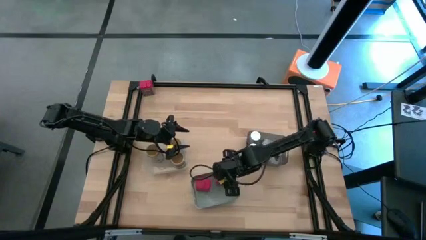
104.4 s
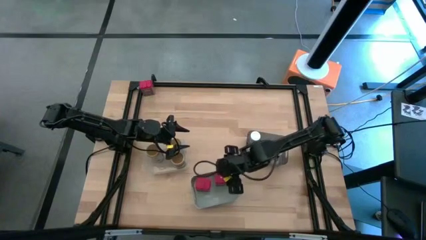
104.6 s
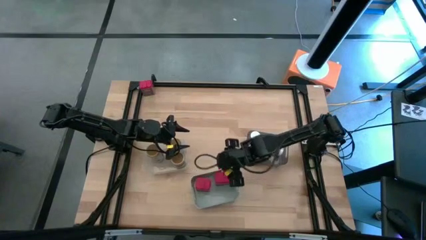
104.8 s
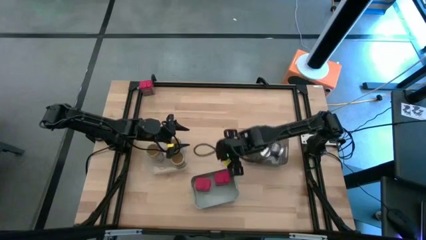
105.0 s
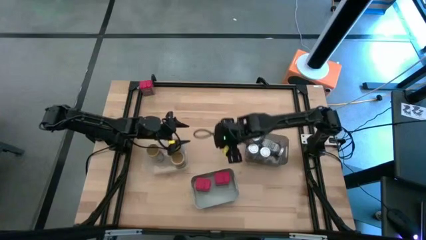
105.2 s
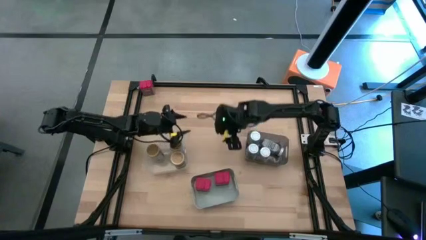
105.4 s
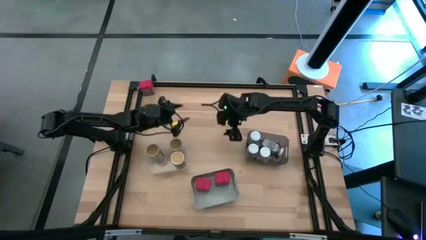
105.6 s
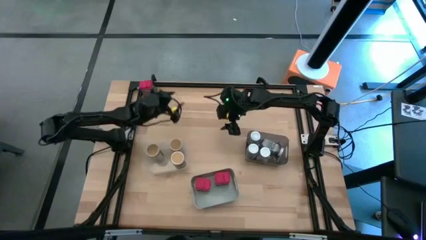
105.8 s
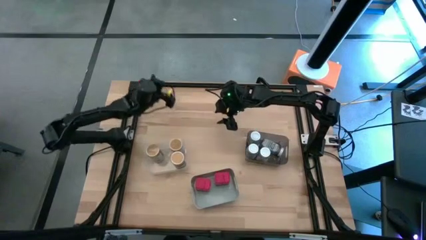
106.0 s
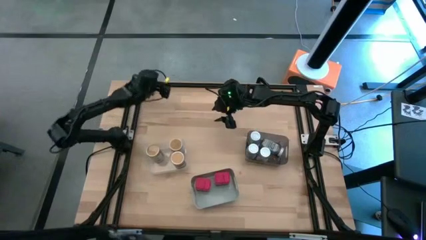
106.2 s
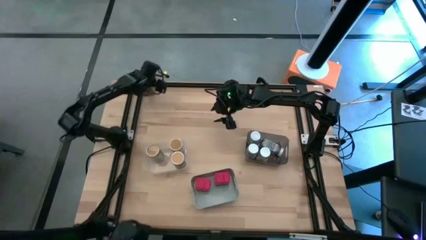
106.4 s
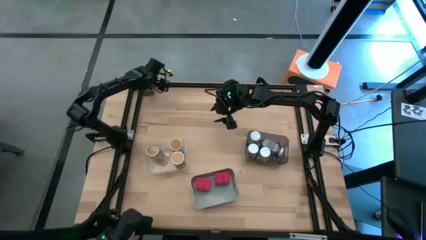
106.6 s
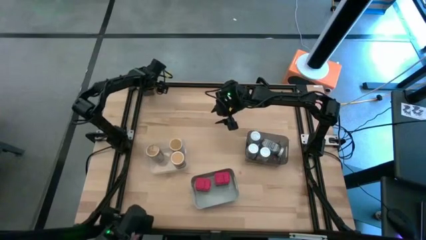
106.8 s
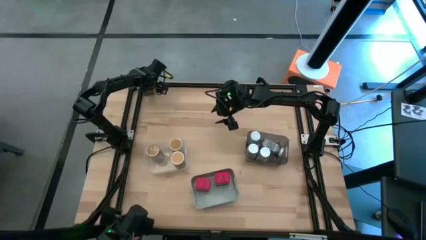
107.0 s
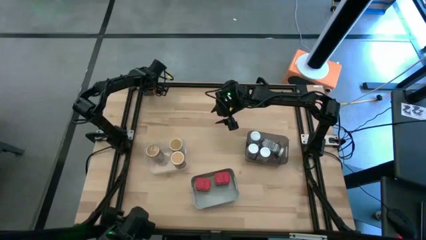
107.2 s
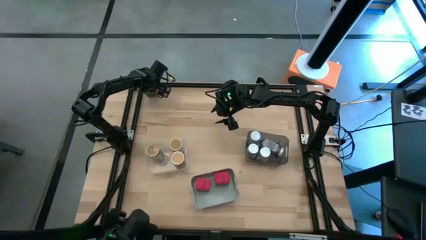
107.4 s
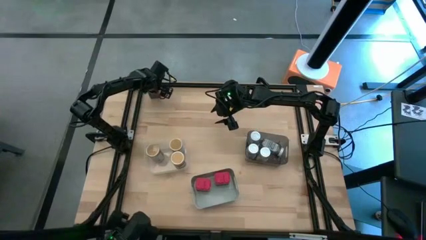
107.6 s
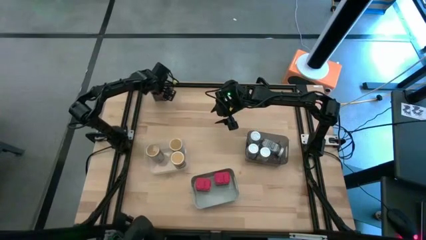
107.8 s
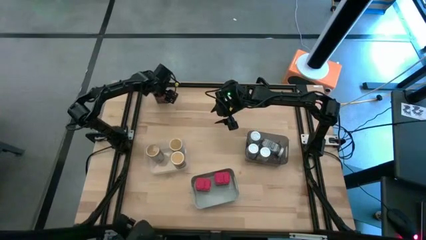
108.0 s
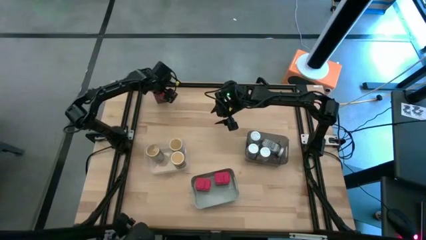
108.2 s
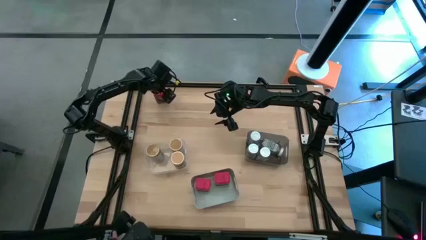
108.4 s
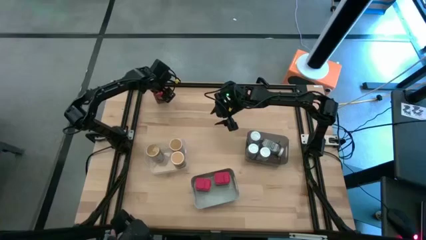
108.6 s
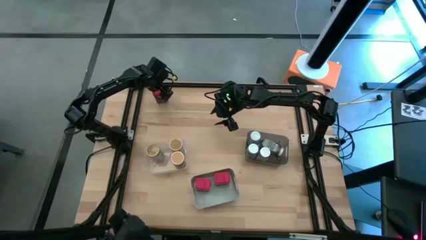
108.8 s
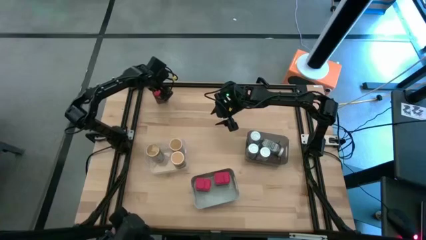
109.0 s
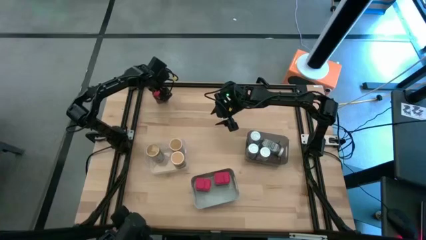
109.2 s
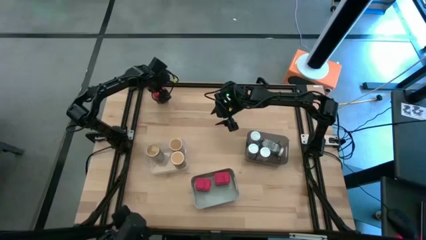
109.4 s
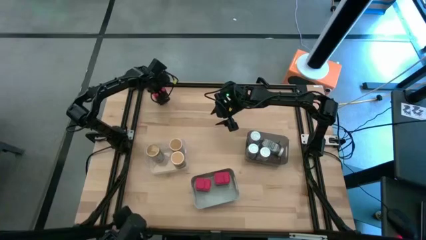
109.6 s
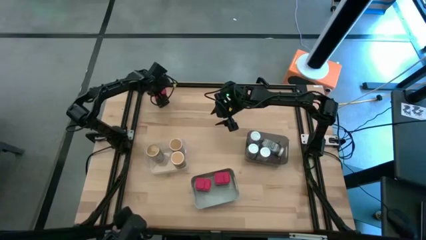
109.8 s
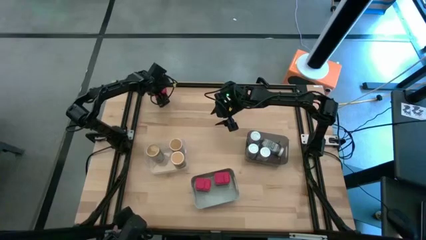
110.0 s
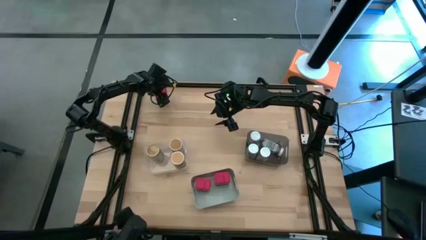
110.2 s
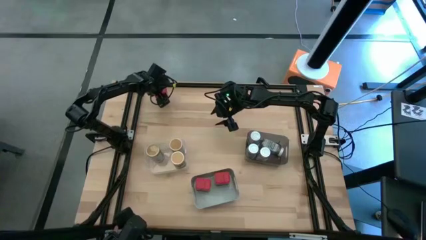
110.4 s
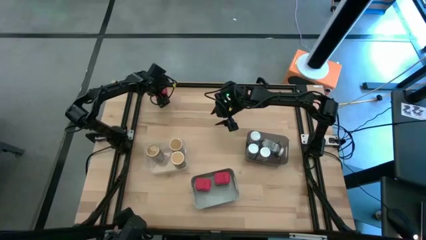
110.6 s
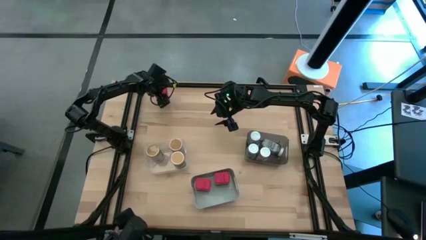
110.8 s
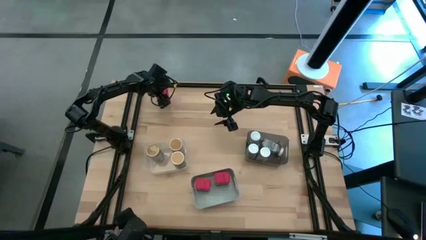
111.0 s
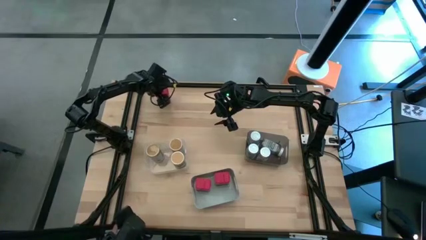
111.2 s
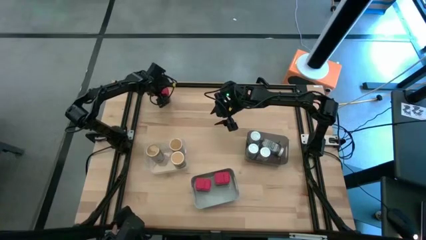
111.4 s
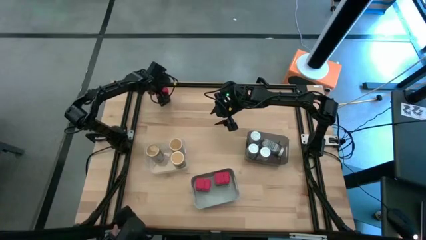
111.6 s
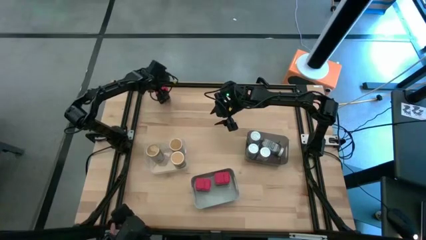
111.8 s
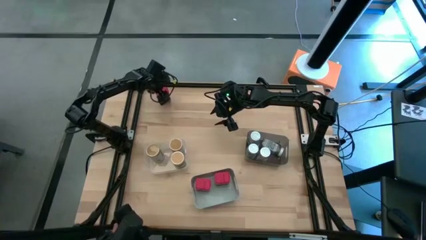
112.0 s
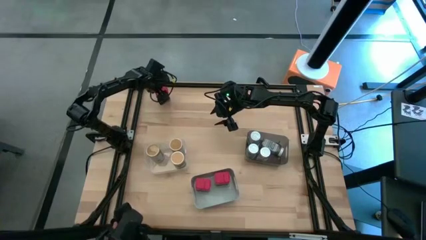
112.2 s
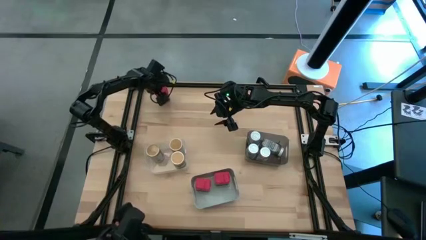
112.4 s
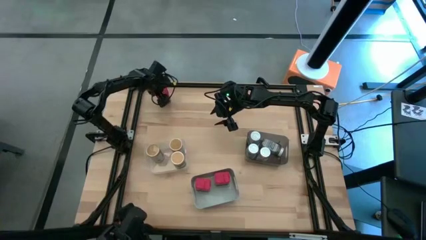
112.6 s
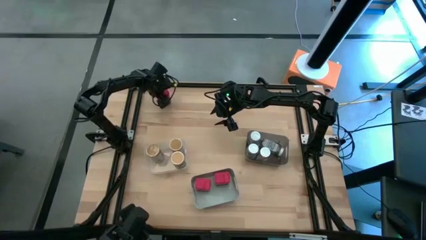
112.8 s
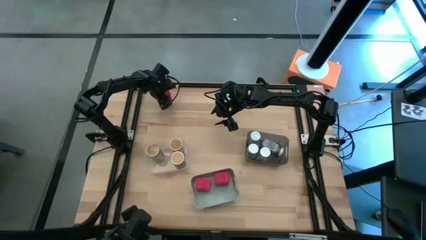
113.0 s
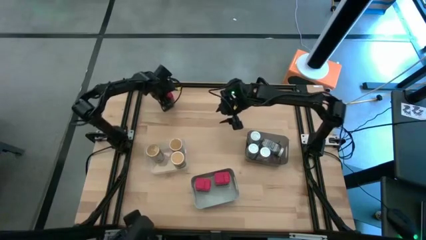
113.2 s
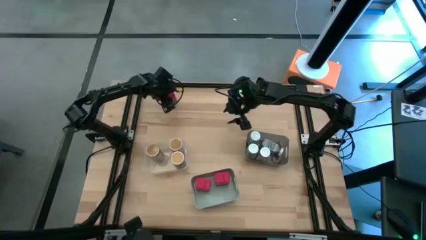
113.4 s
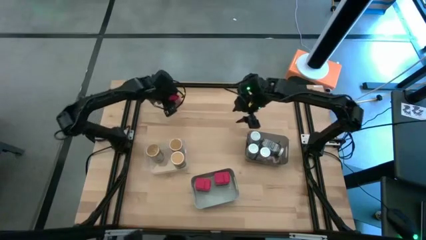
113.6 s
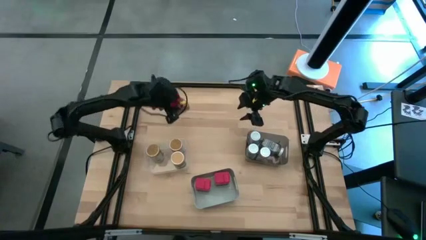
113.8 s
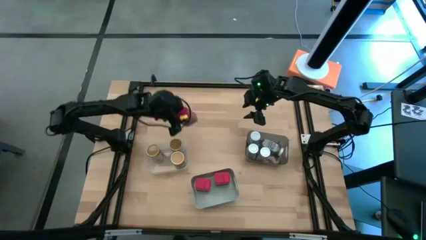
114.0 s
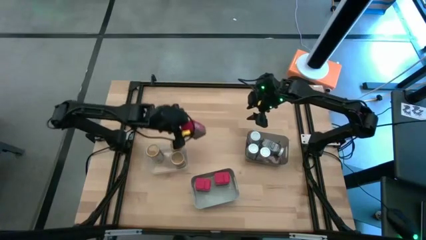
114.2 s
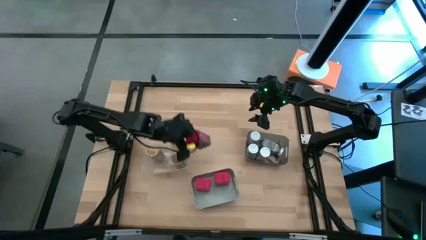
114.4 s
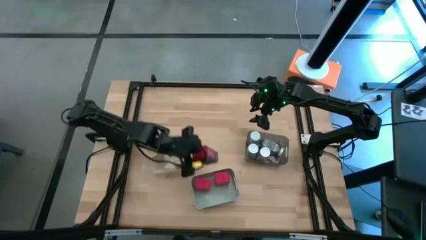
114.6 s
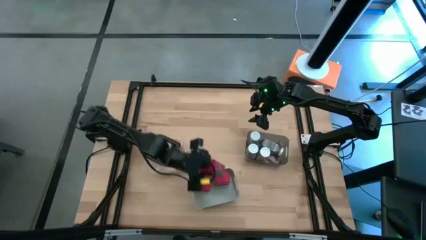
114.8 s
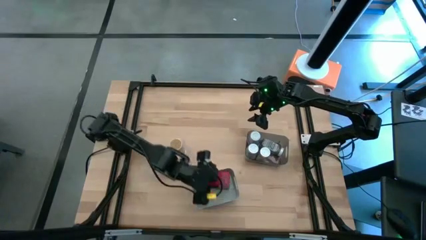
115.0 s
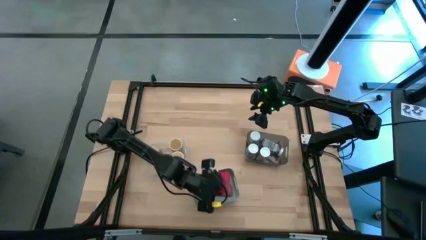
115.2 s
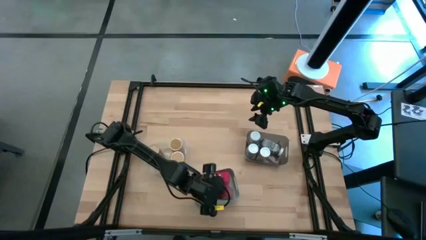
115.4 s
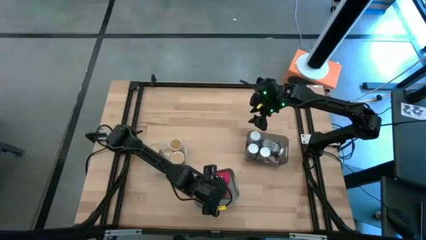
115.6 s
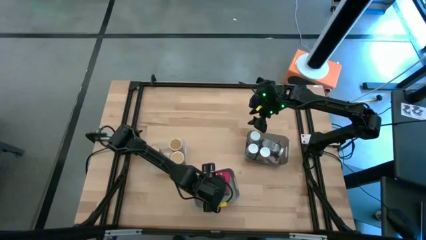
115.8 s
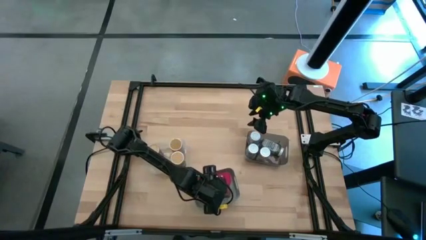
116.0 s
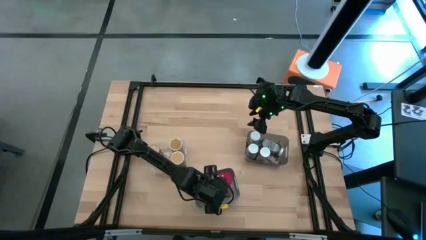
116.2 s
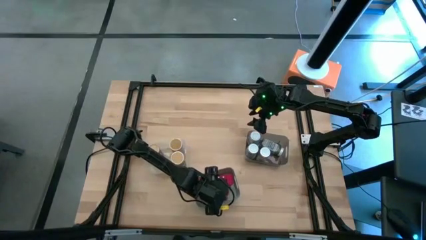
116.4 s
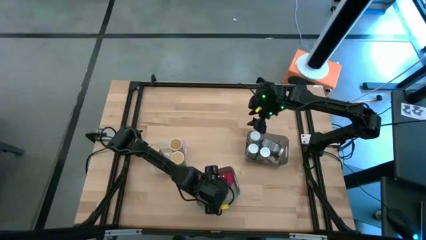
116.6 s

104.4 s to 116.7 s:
Task: Sort spices by type
Put the red seasoning can into the gray bin

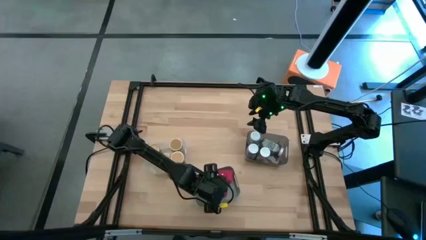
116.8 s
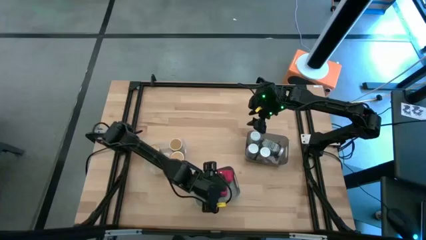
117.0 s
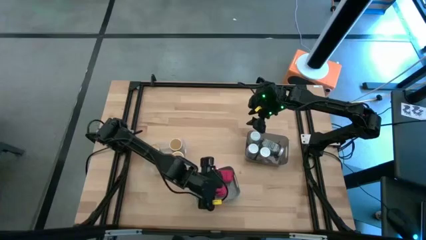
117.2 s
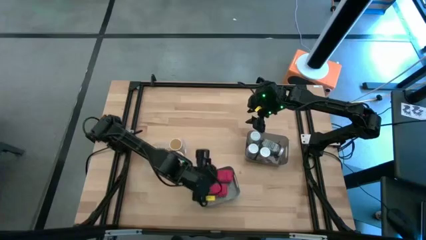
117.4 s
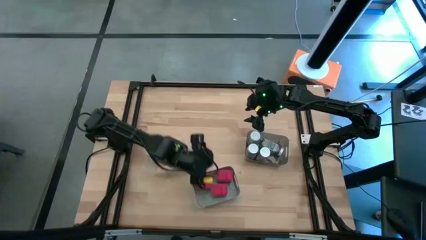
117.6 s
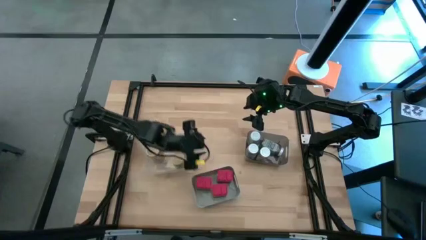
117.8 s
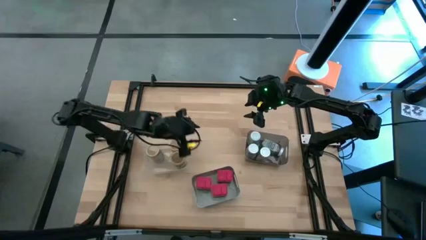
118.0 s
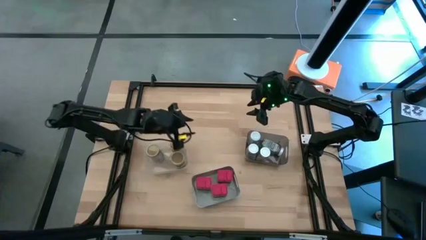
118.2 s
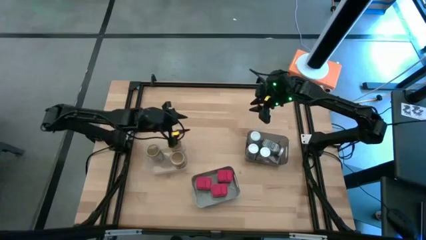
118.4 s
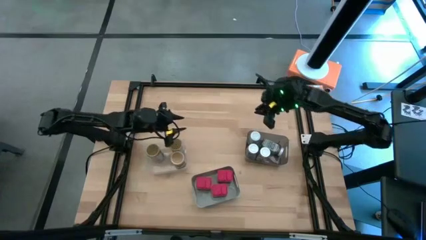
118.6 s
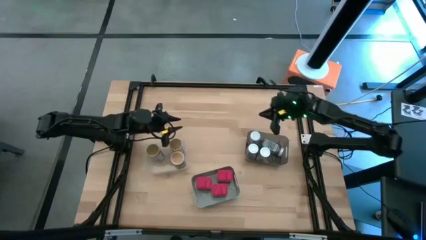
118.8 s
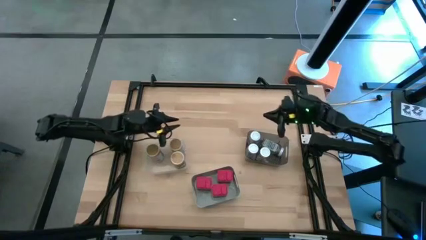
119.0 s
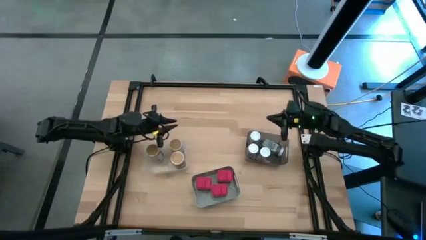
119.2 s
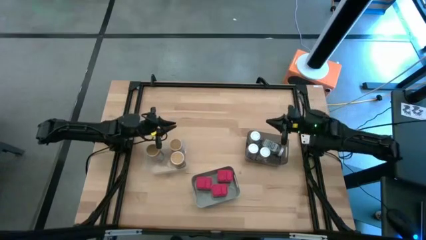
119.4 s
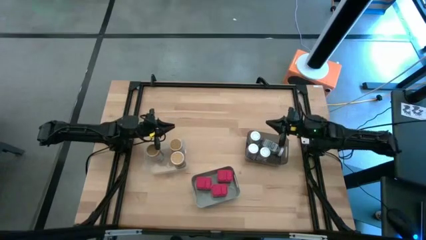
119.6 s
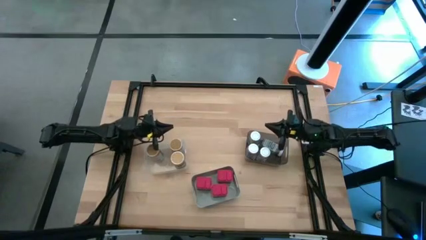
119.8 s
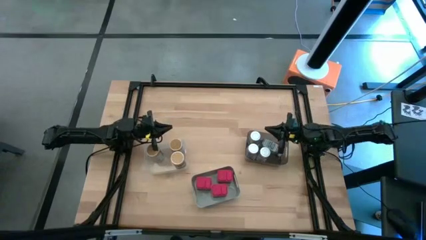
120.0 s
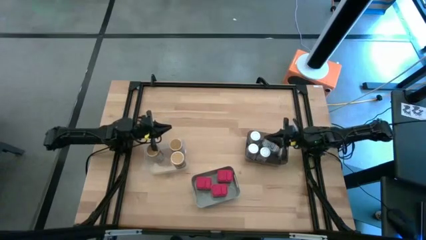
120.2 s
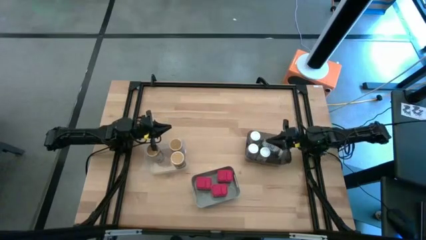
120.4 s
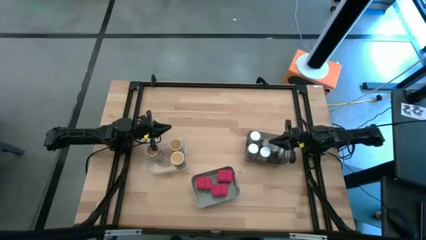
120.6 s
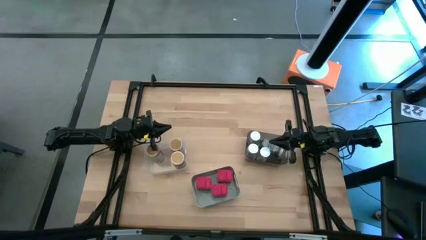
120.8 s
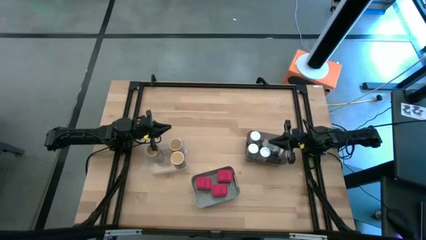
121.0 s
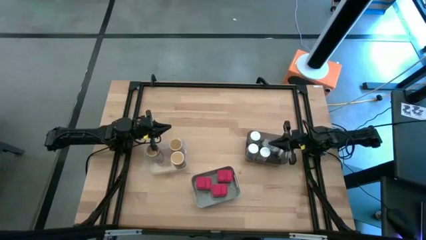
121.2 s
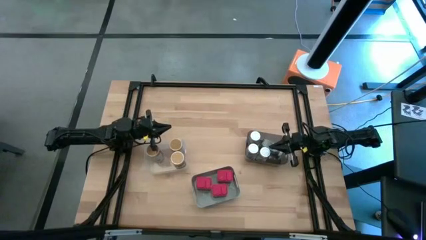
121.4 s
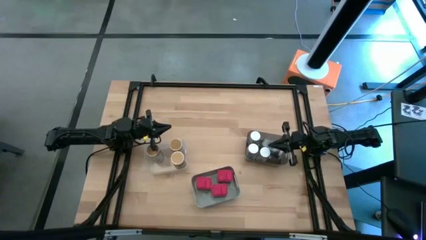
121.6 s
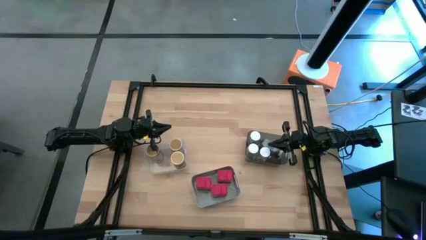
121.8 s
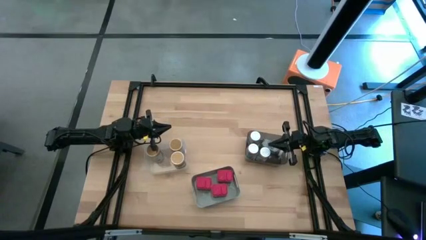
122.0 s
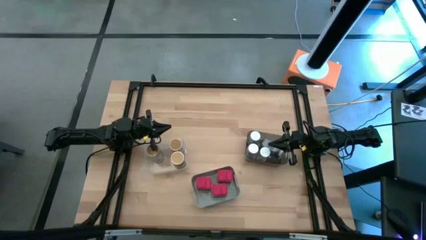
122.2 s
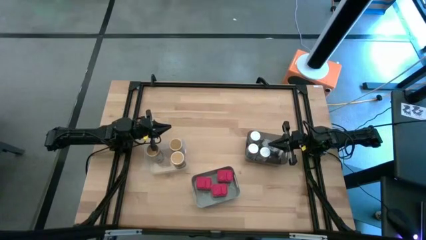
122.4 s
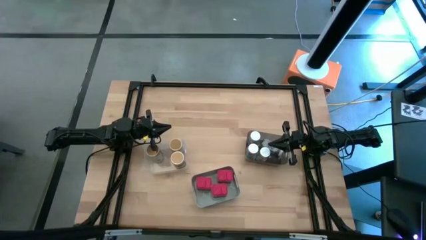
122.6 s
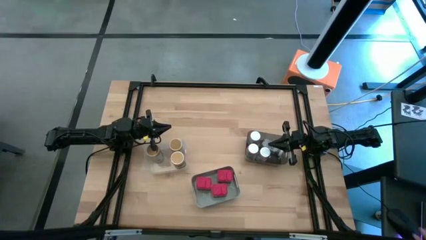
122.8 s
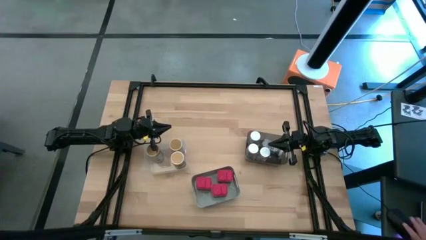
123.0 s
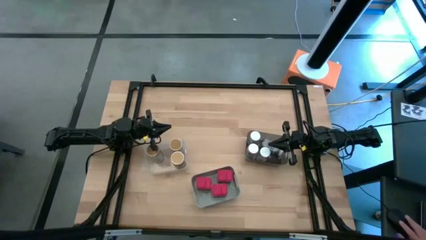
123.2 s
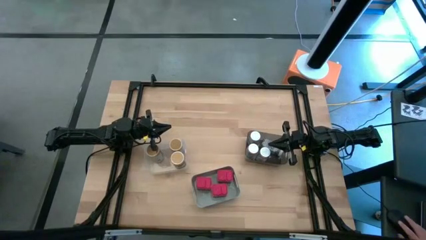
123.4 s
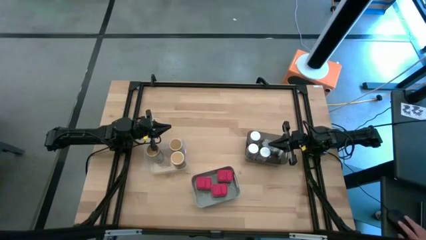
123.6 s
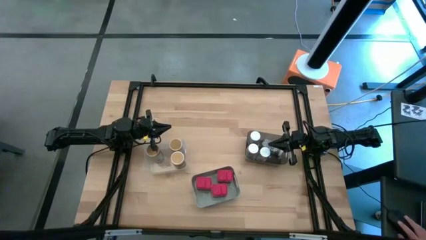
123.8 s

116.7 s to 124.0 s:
Return to Home Position
